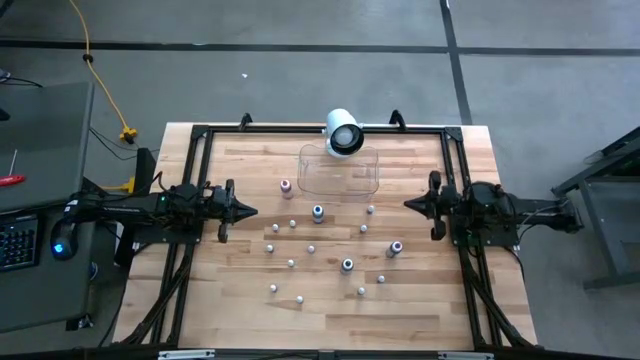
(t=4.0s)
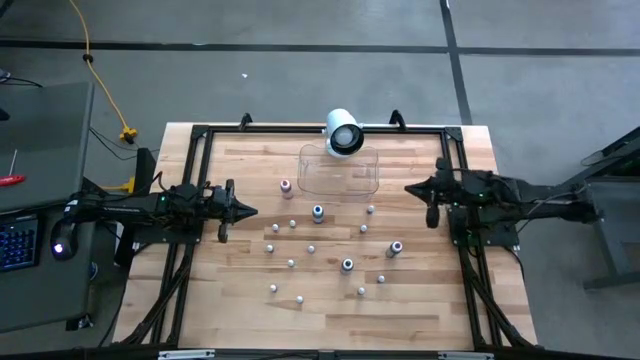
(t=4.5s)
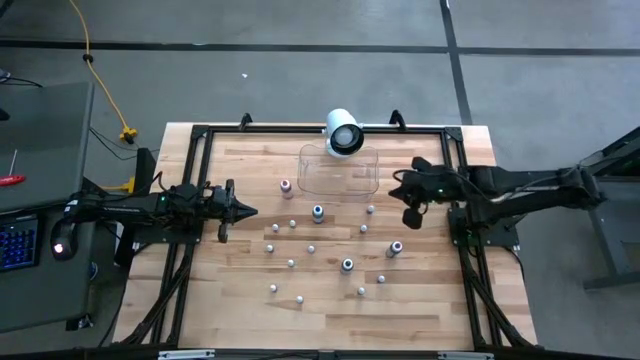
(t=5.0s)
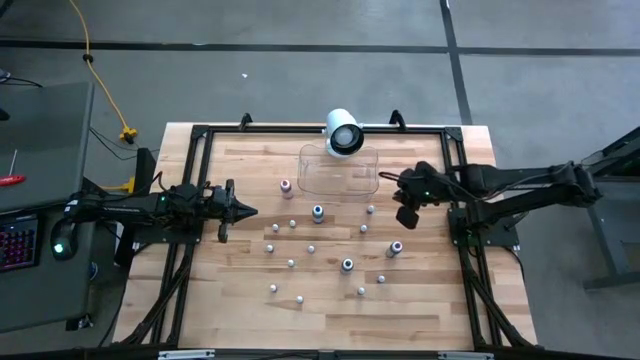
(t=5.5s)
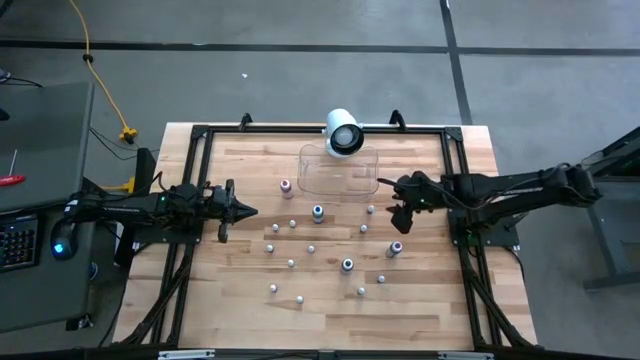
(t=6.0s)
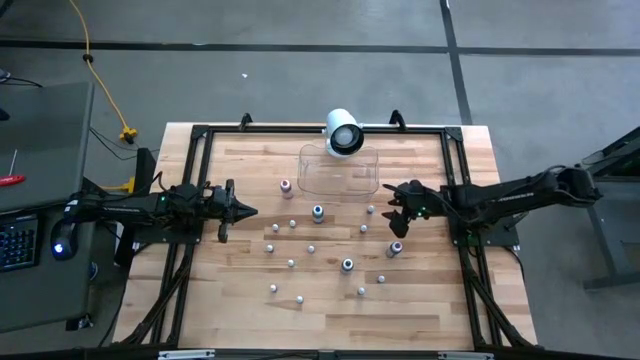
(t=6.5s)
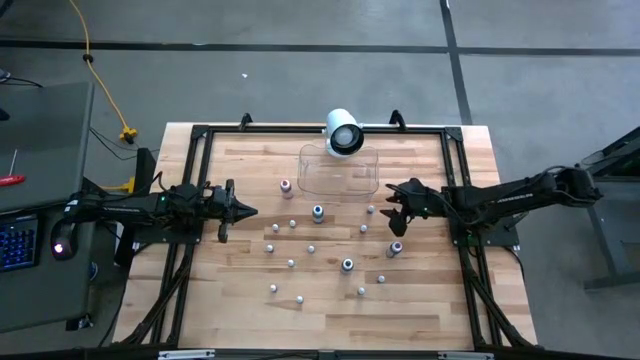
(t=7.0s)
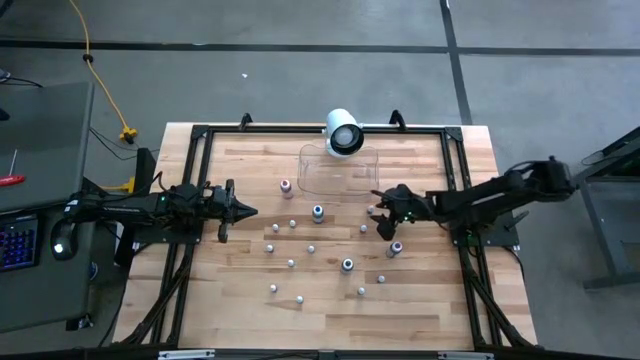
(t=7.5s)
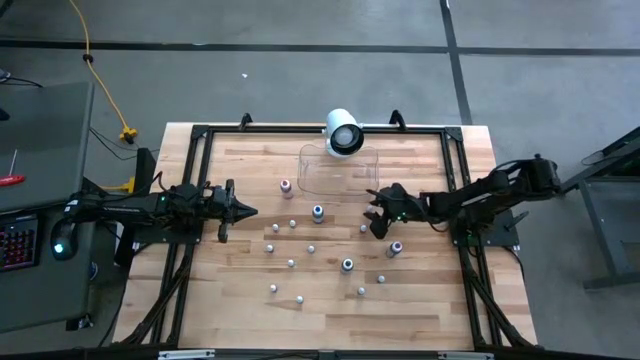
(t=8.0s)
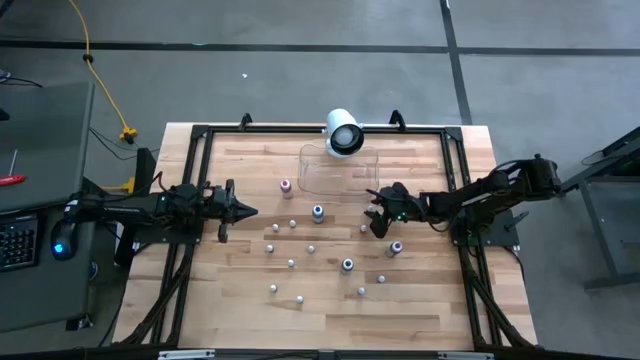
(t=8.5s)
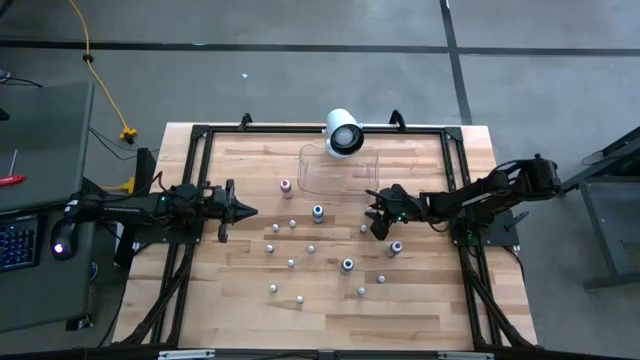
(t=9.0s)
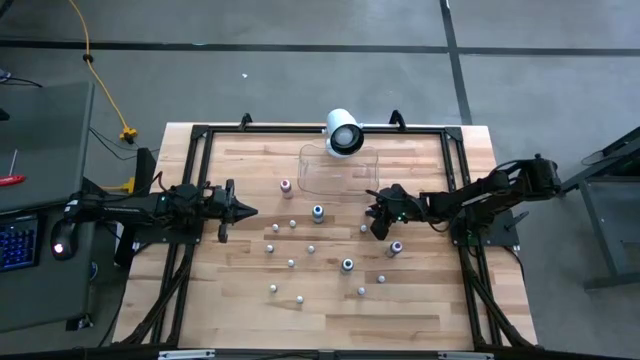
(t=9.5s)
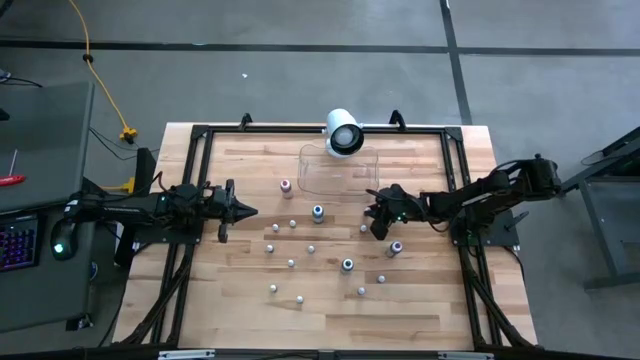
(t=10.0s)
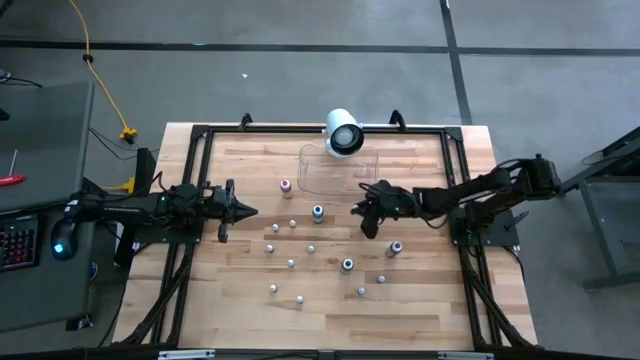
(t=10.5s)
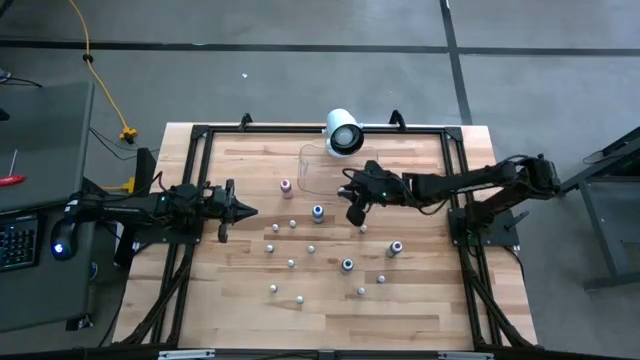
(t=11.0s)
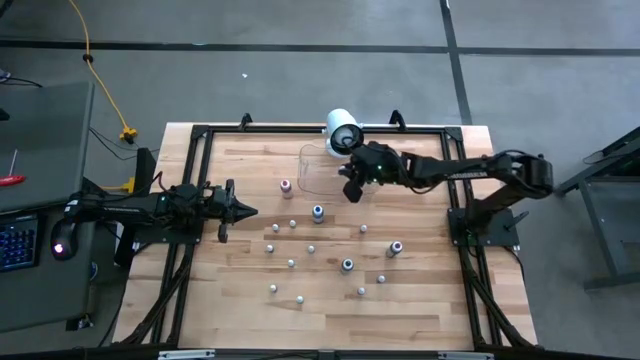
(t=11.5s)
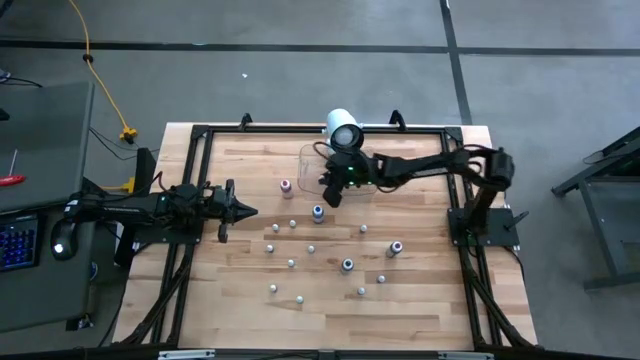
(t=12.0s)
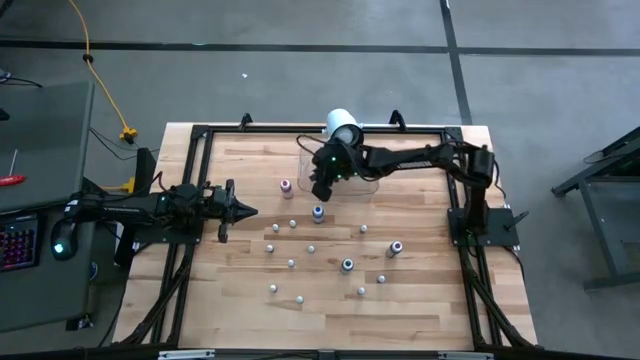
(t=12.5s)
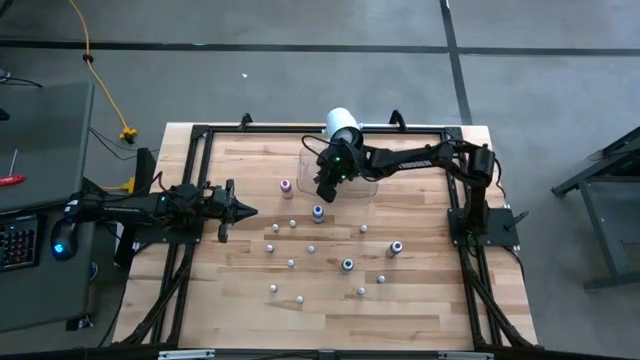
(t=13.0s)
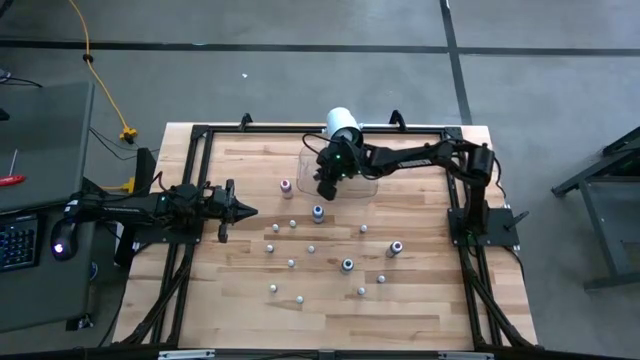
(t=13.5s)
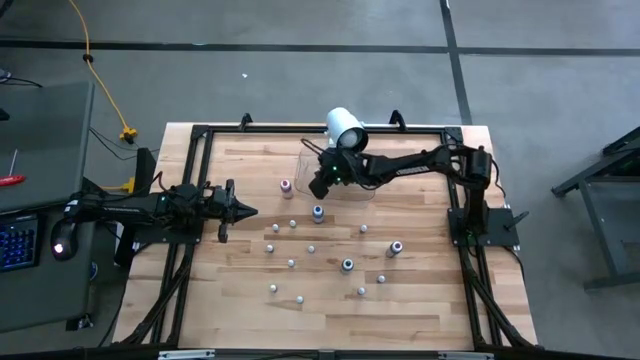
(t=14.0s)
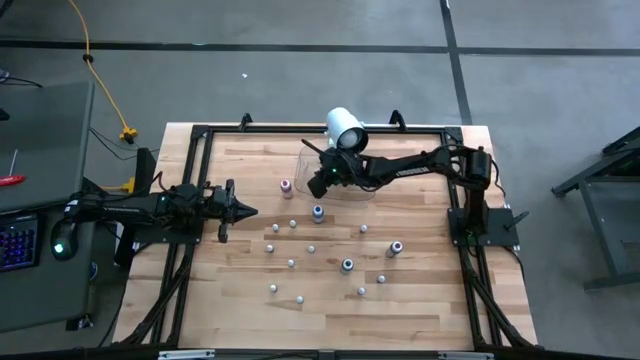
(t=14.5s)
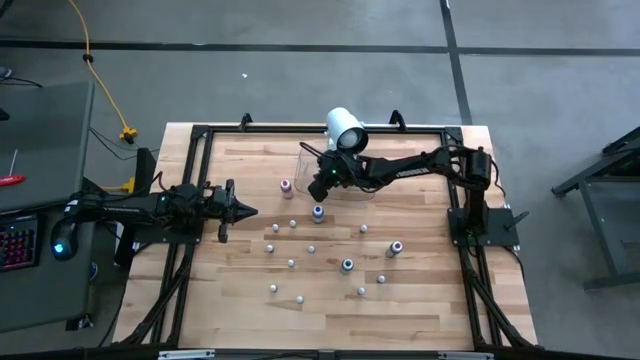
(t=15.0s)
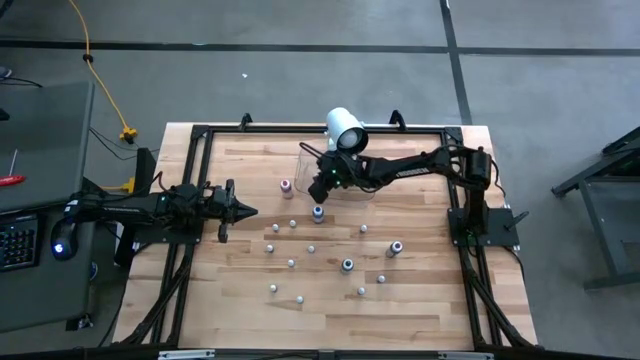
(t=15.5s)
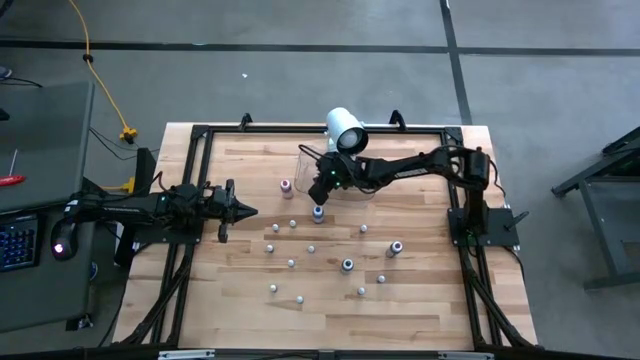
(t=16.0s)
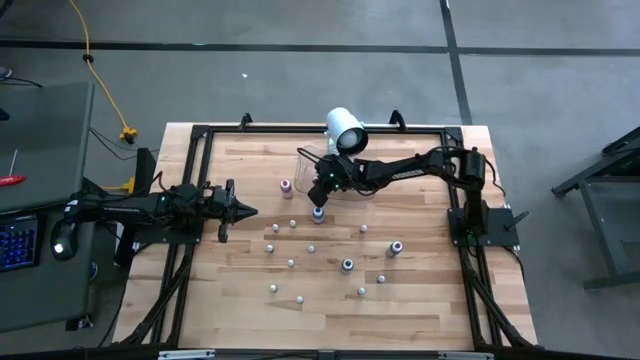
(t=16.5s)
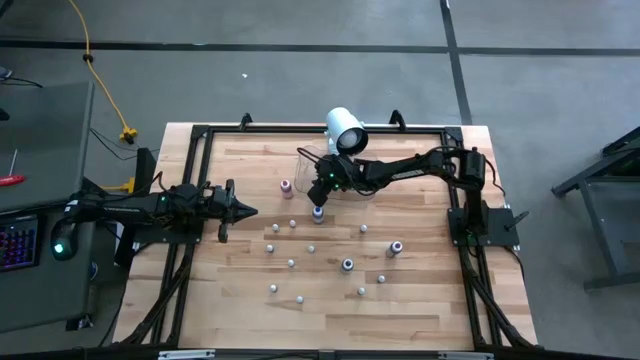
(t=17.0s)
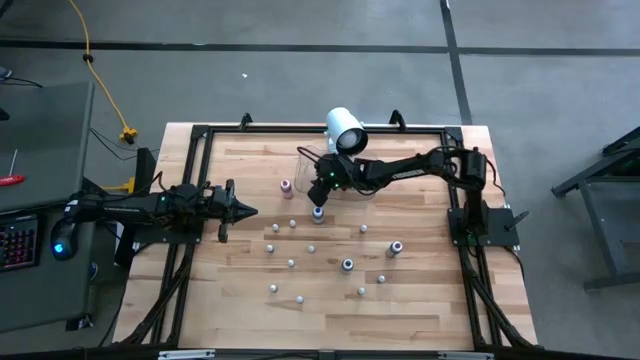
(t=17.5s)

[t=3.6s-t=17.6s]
Task: Pick & Place food coloring
Put the small blue food coloring bottle into the transparent bin

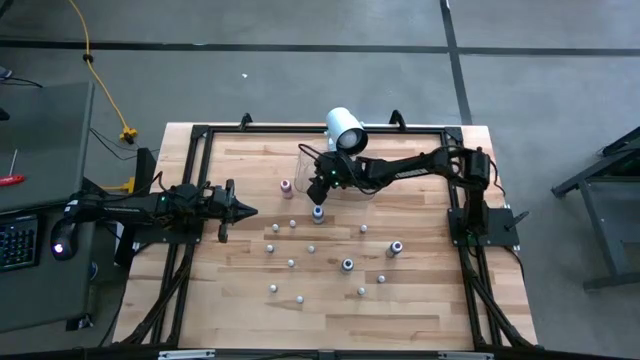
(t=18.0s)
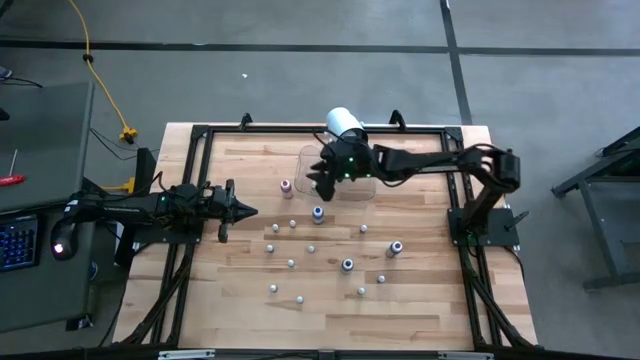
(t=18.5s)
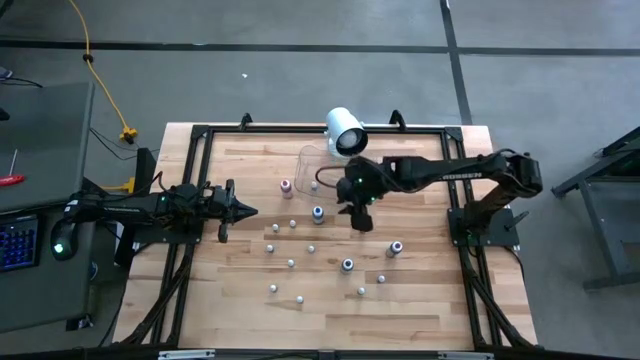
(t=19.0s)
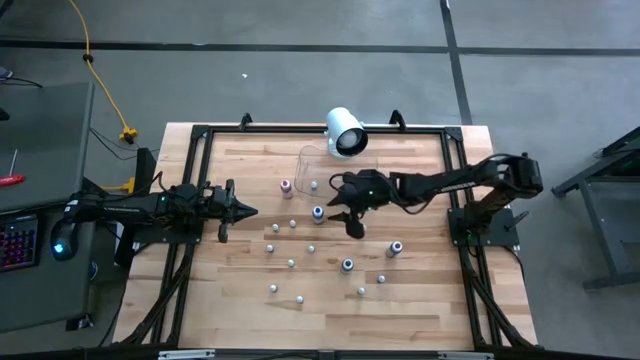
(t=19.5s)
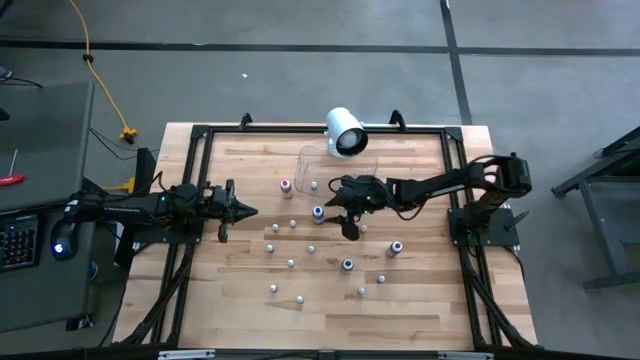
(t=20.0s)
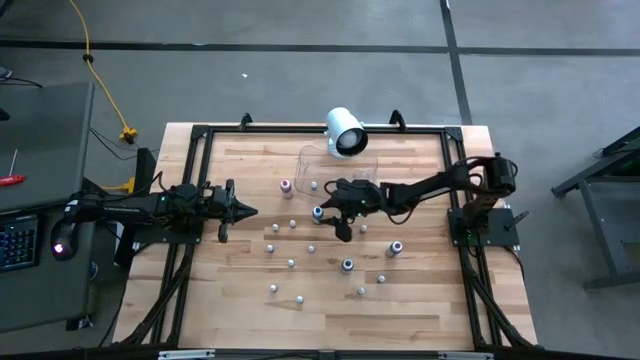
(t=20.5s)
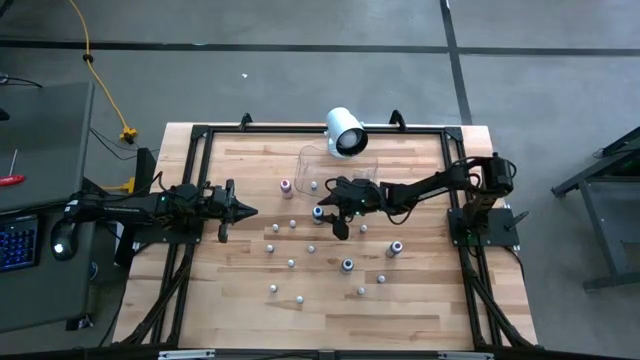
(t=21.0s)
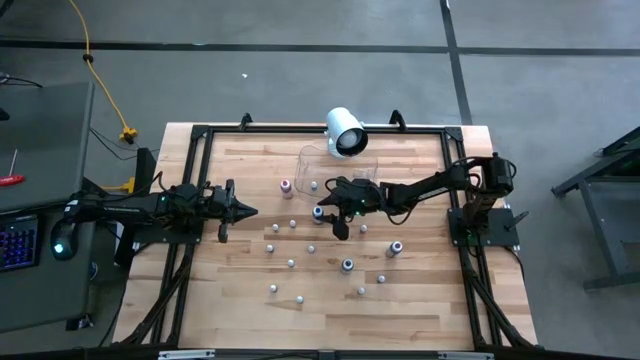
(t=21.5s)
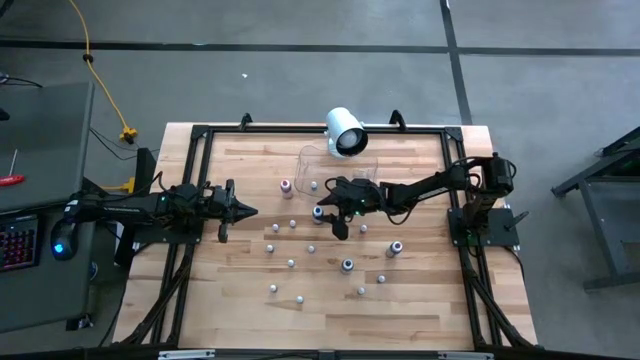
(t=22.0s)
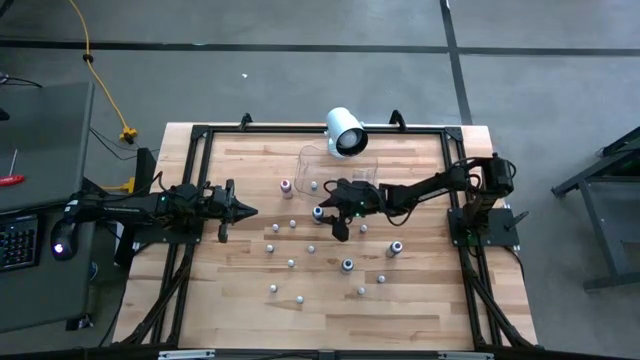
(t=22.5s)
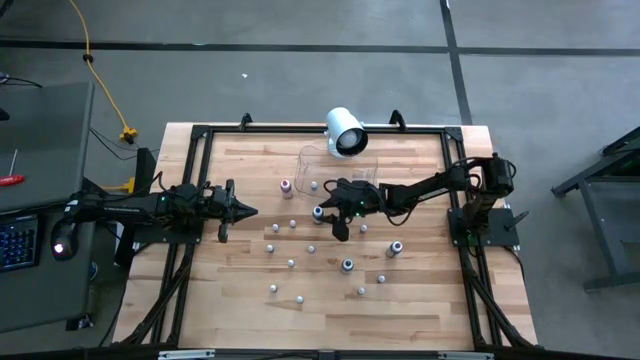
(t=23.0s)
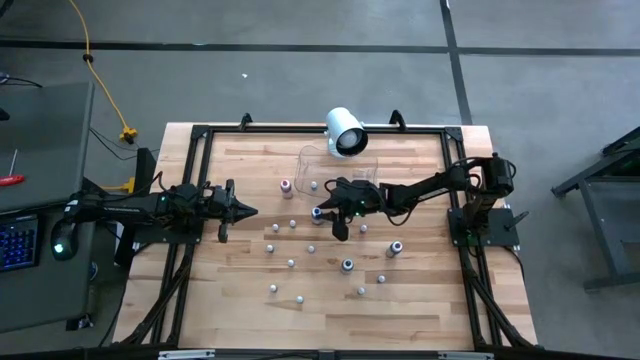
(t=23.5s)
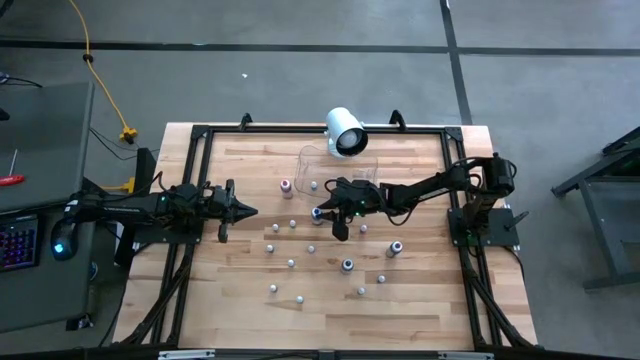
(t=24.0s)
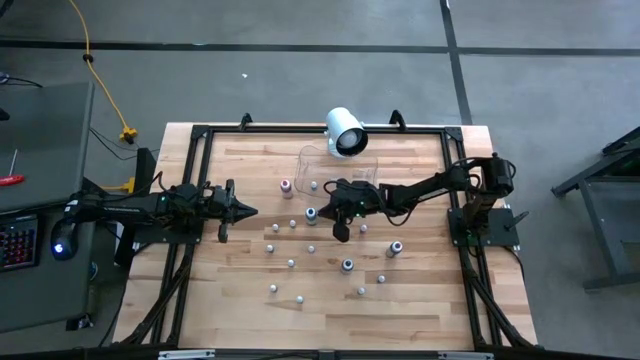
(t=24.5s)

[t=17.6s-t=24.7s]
Put the large blue food coloring bottle into the transparent bin
